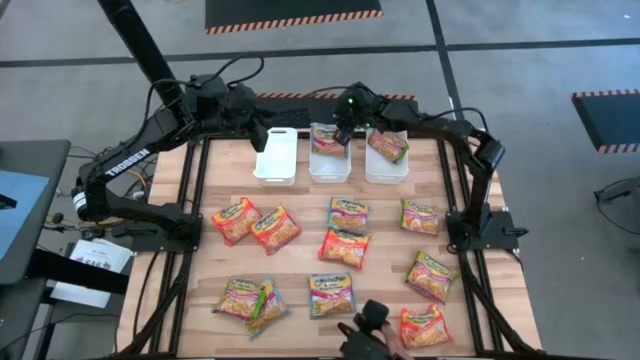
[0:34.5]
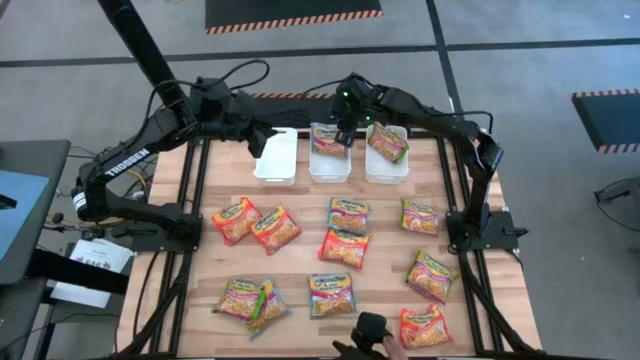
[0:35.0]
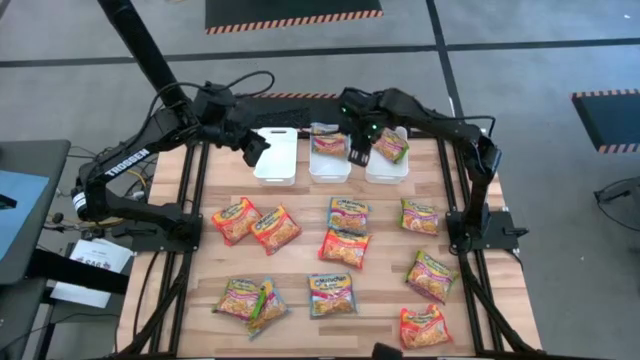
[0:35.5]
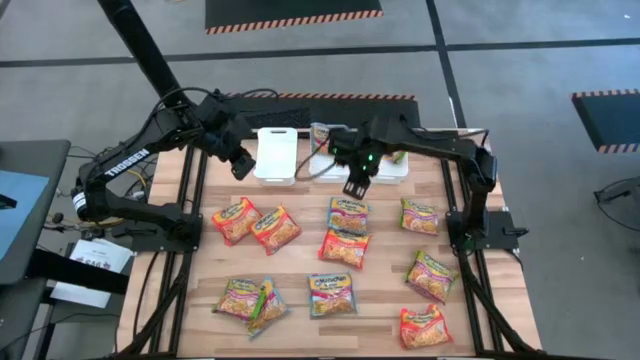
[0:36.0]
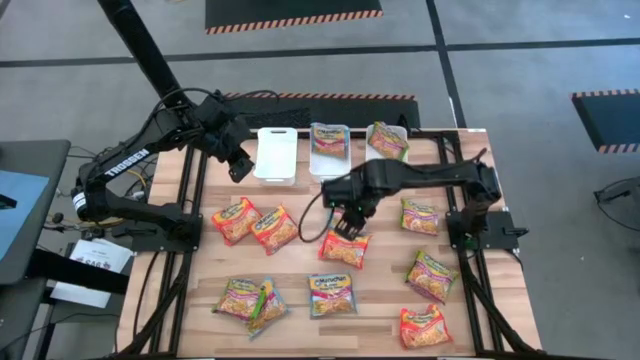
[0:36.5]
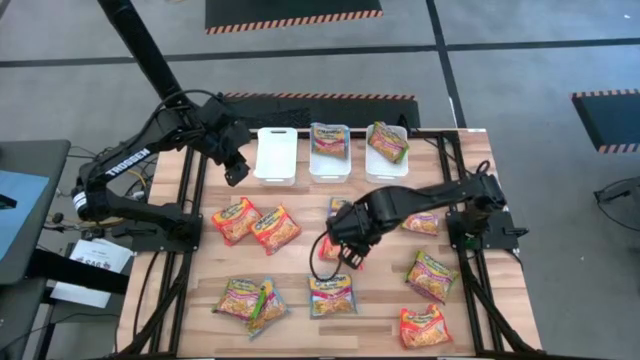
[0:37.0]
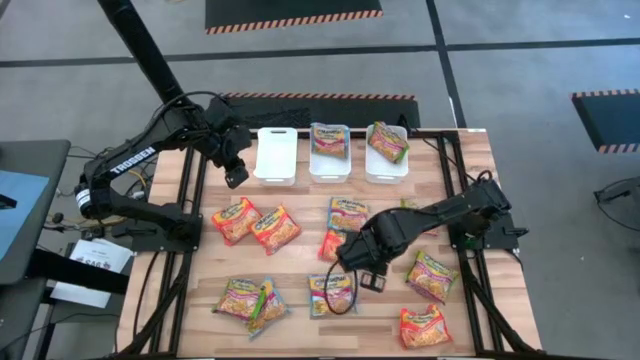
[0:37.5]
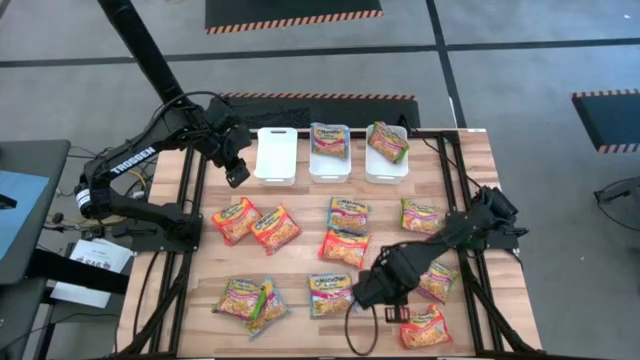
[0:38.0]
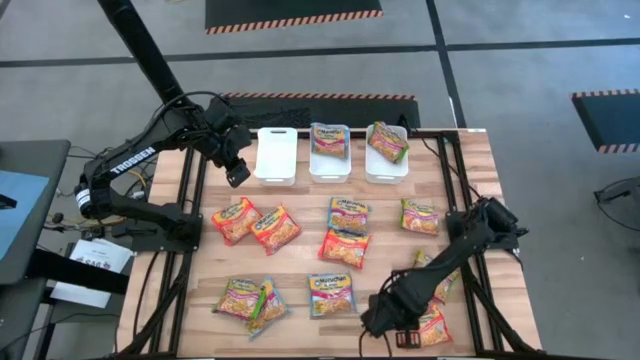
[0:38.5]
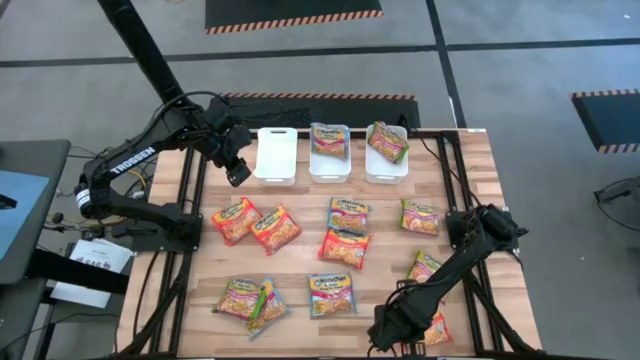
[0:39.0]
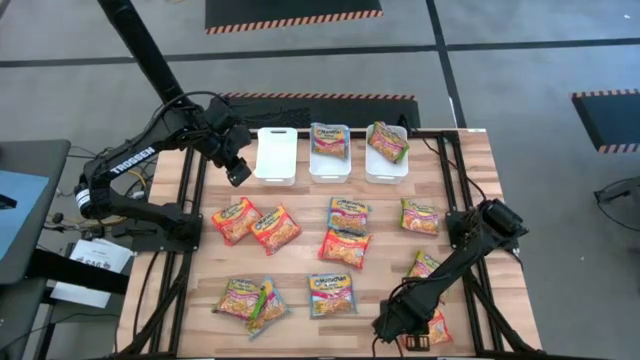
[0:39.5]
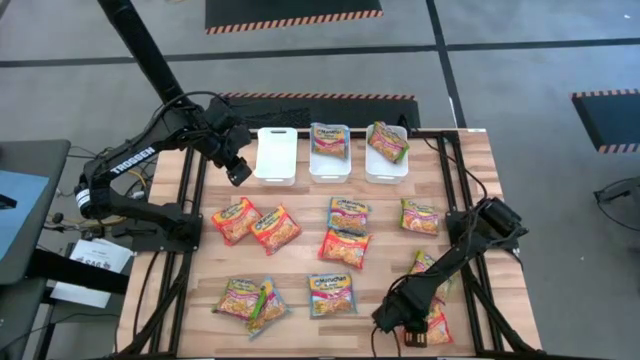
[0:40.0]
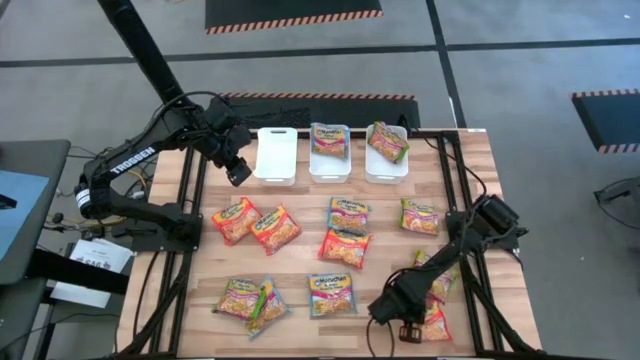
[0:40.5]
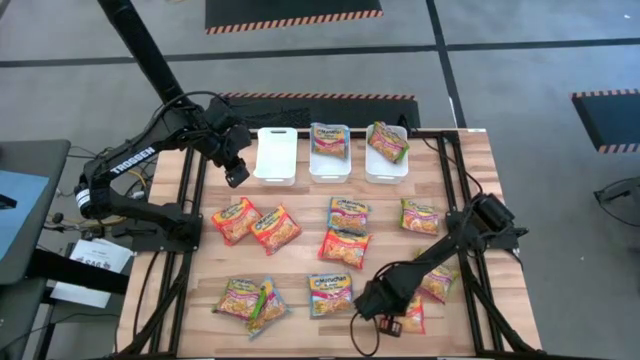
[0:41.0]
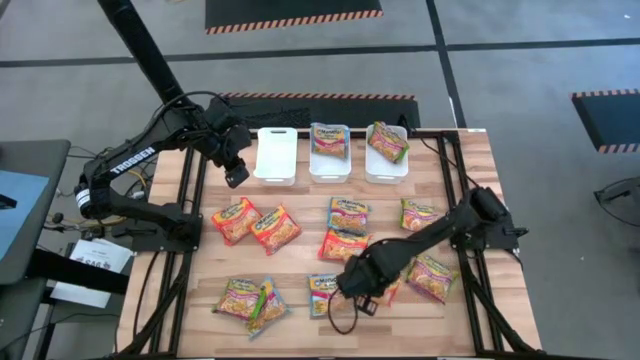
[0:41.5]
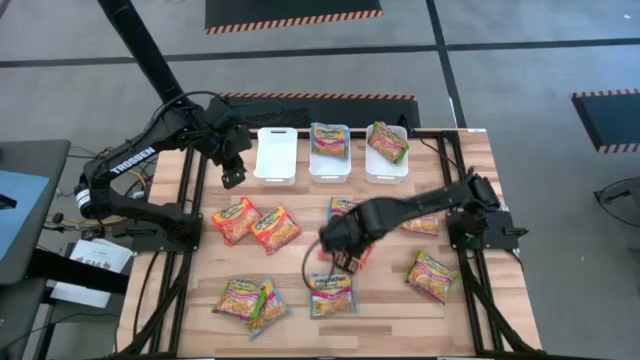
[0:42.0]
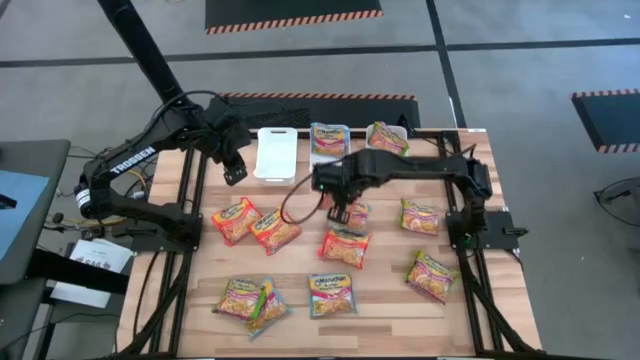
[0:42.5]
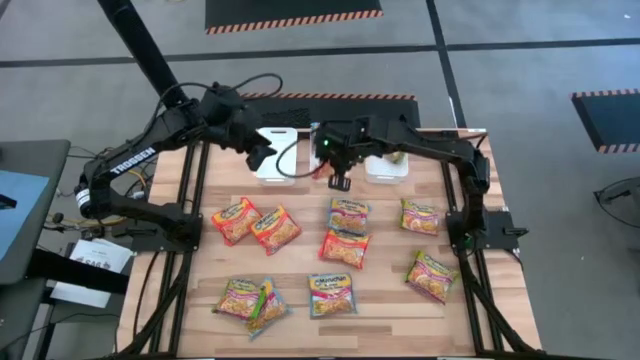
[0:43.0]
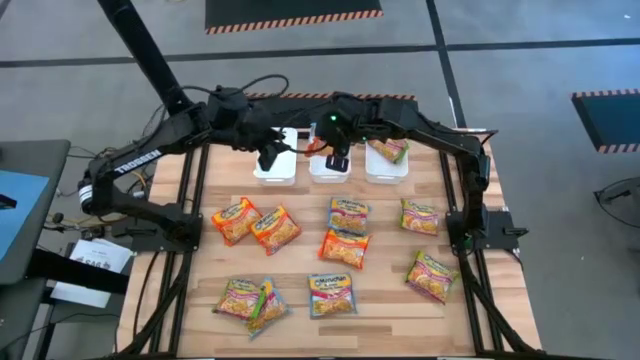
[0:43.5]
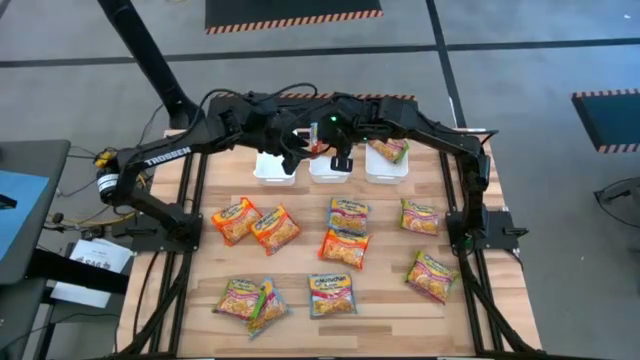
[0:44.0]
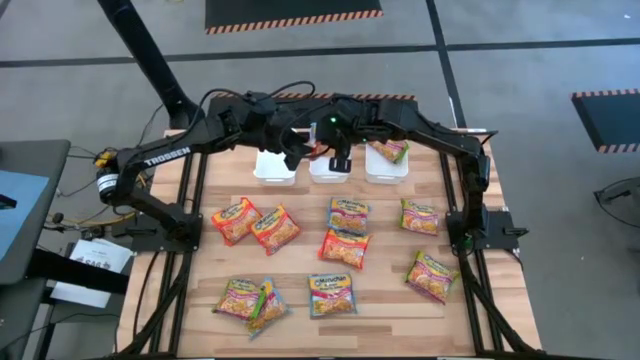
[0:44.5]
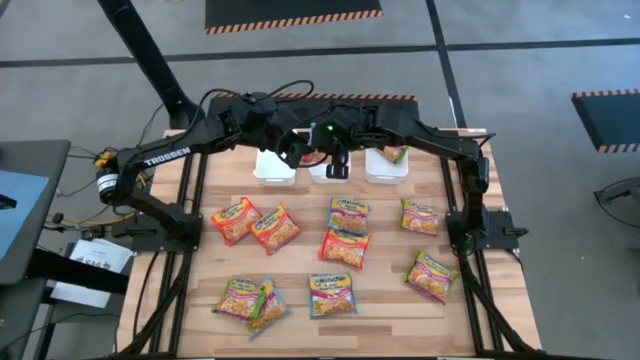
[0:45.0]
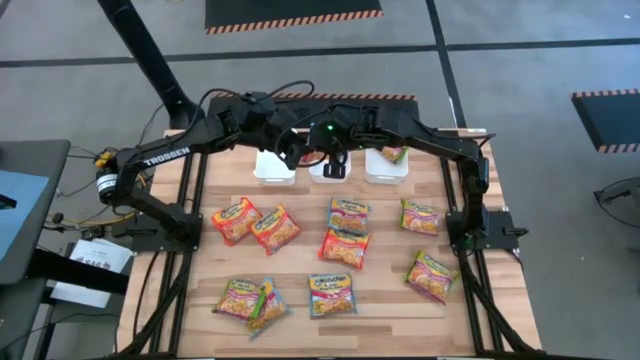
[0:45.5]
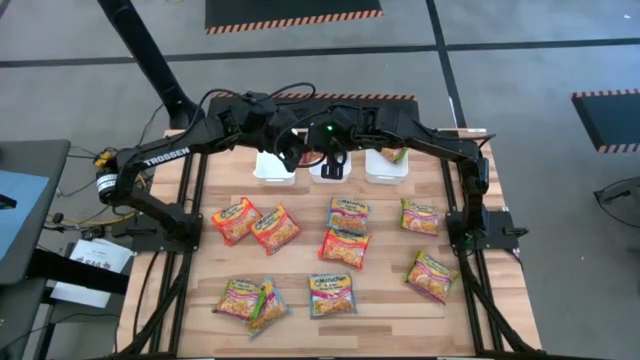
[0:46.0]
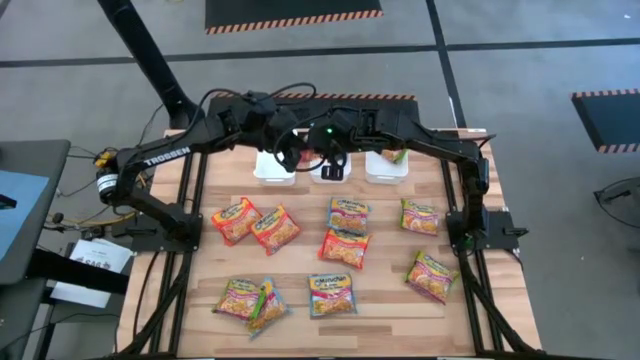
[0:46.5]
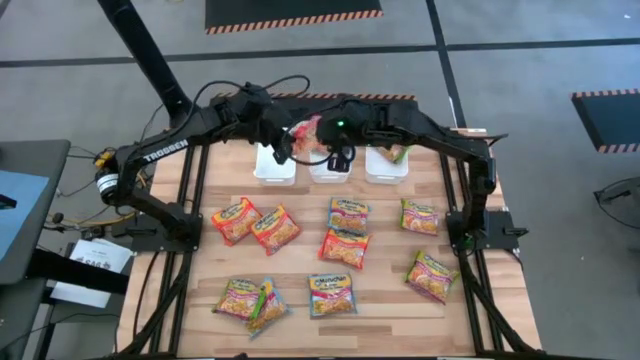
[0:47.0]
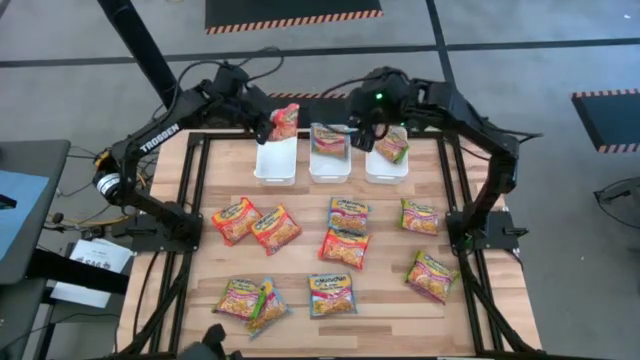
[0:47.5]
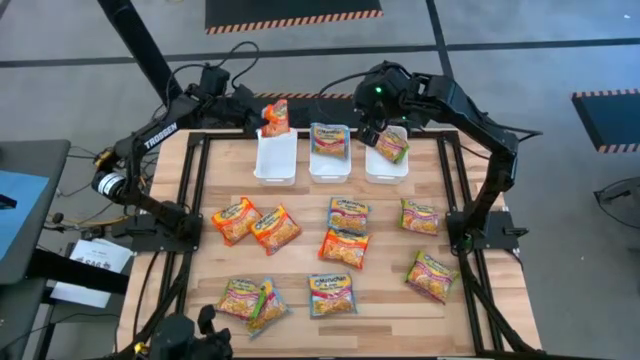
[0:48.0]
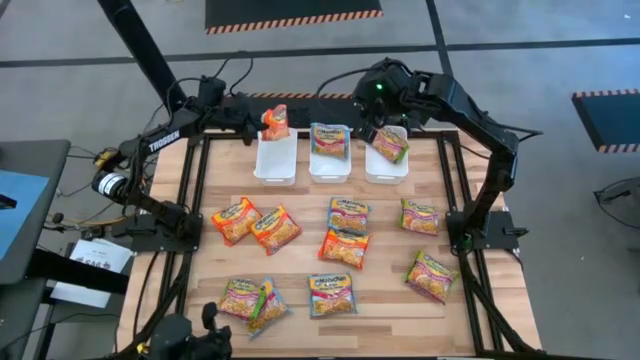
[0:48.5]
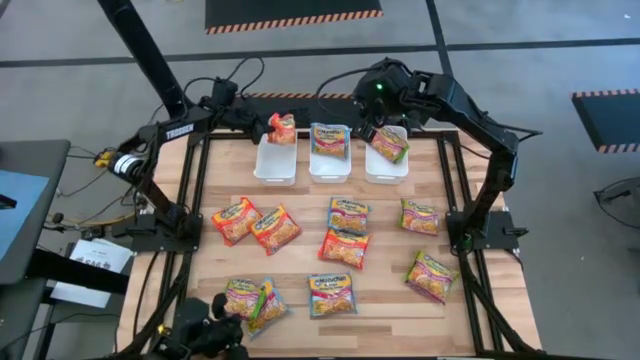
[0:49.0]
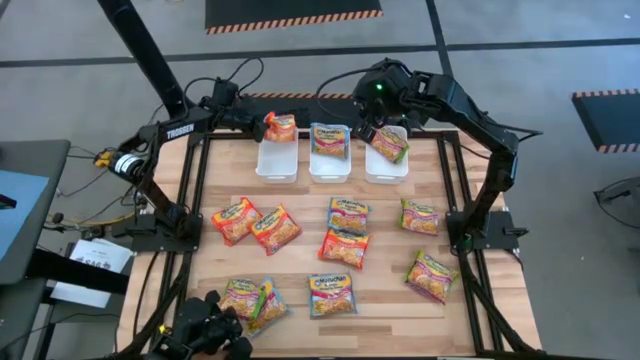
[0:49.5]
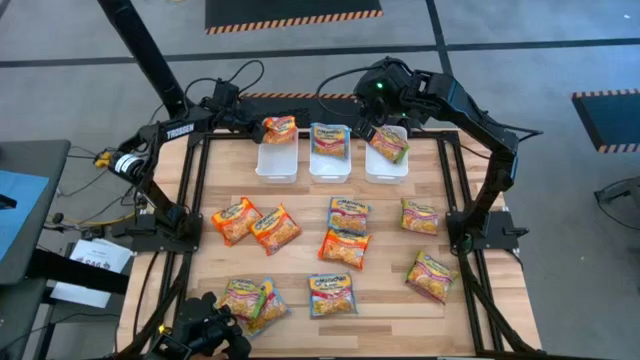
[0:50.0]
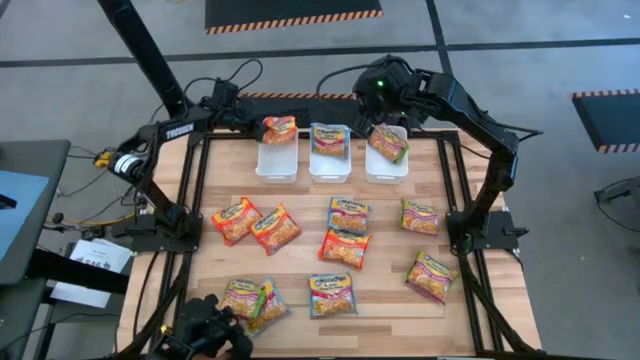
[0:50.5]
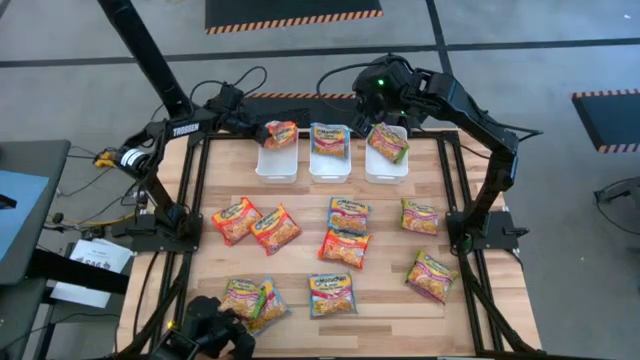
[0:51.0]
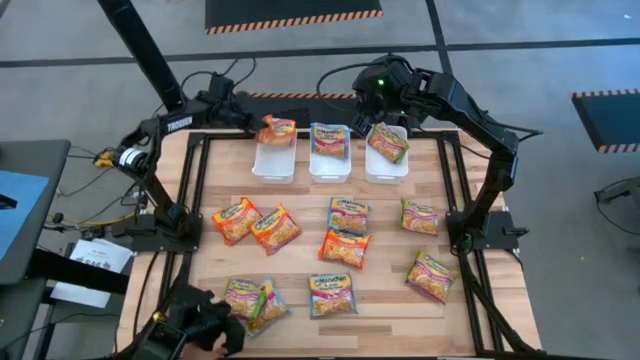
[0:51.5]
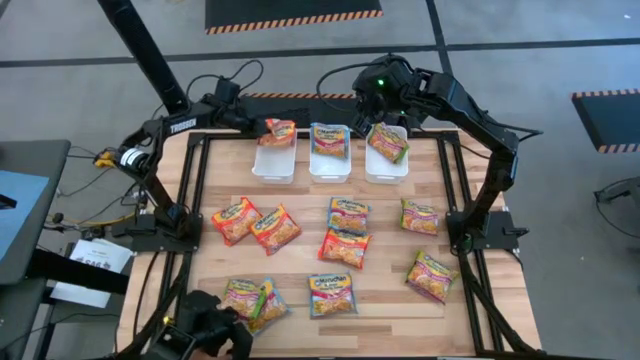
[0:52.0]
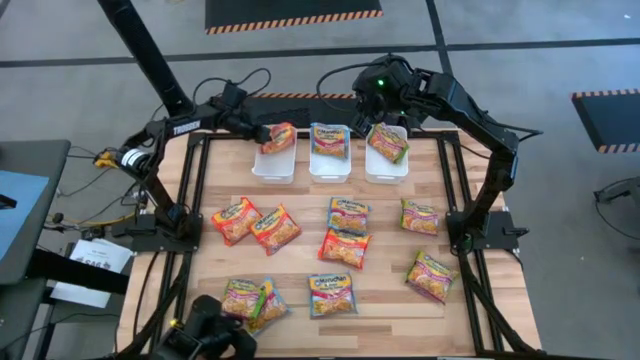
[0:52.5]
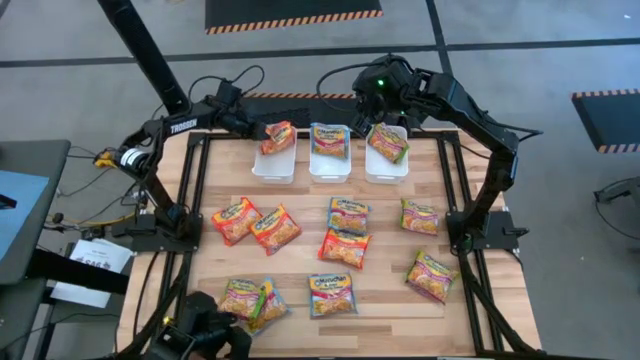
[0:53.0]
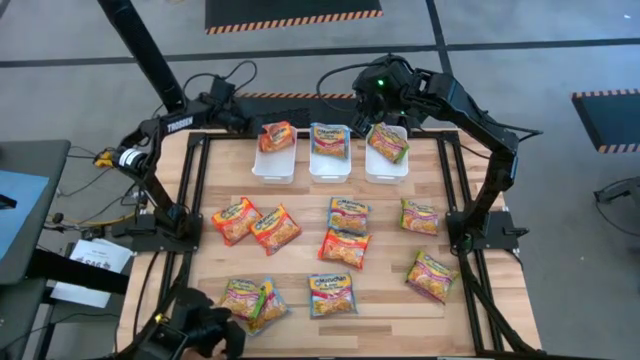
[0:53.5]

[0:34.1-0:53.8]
Task: Sort Maruchan noodles
Put the orange noodle pack into the left white bin

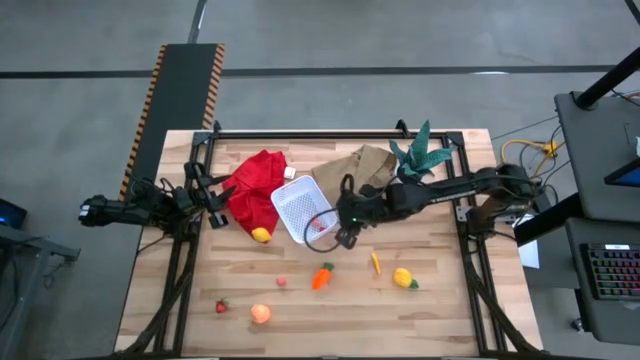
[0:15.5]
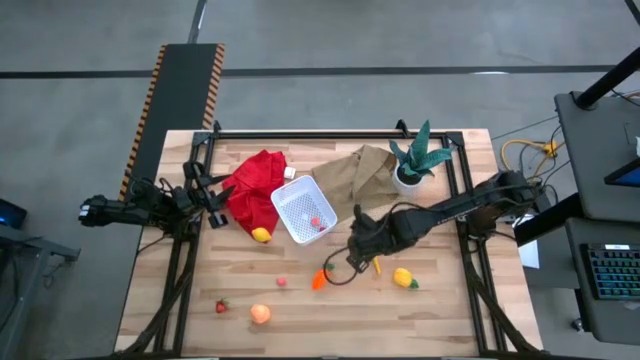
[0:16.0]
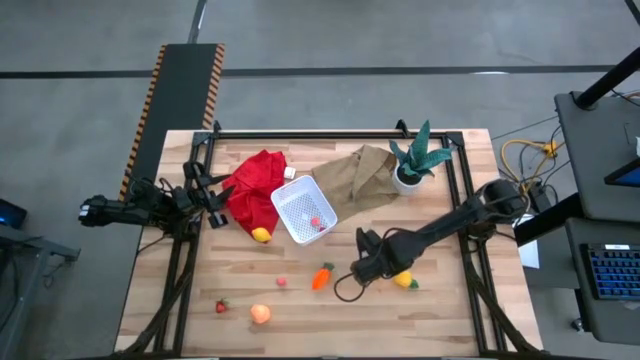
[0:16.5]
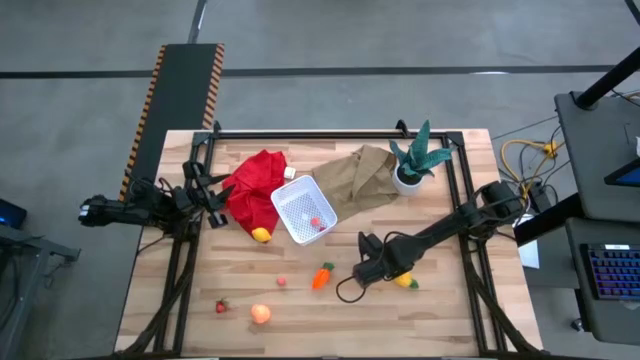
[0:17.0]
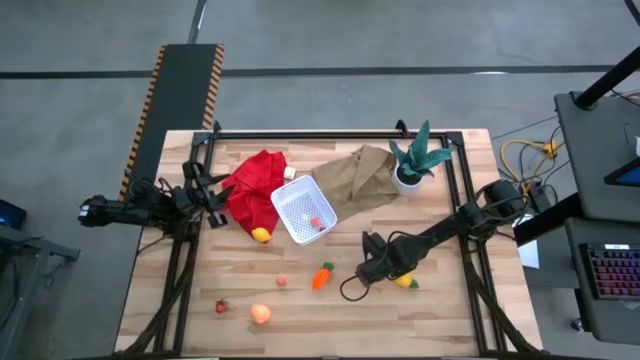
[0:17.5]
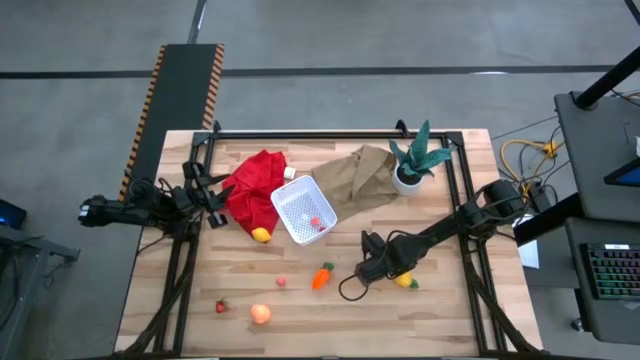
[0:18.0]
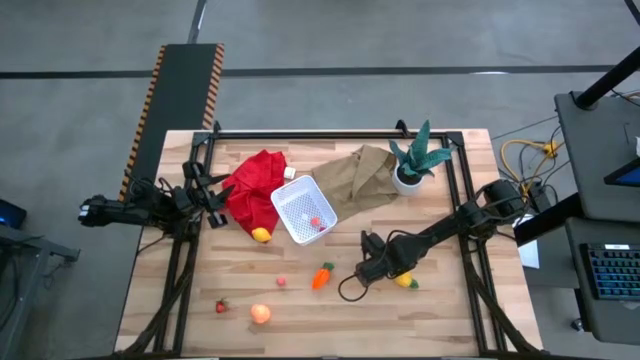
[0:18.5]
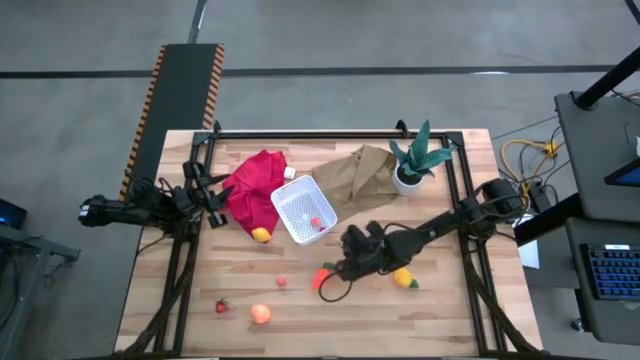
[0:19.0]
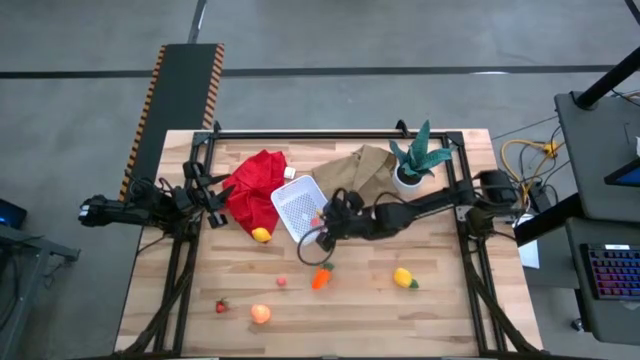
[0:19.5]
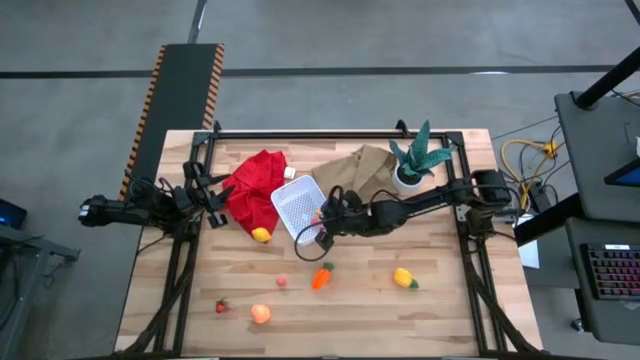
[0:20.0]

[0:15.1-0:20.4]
Task: Pick and placing Produce into tupperware
Put the toy banana into the white bin
